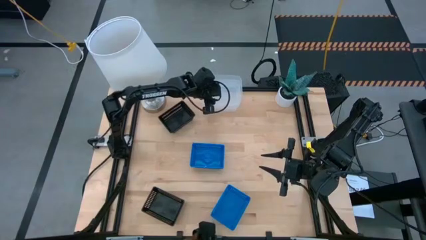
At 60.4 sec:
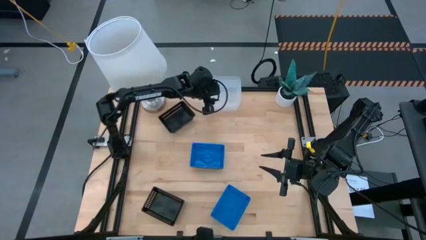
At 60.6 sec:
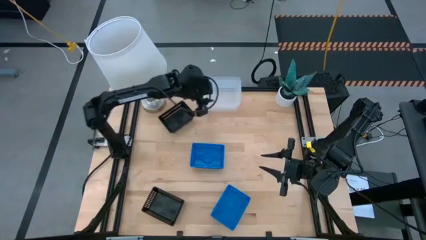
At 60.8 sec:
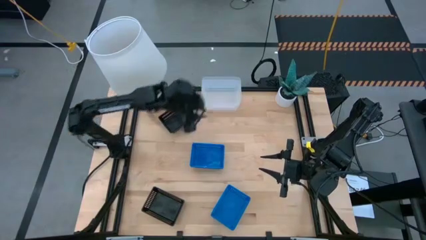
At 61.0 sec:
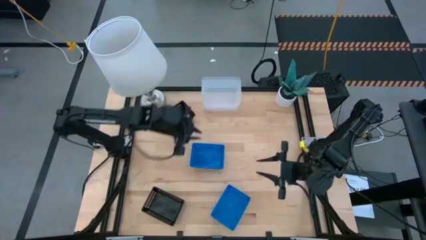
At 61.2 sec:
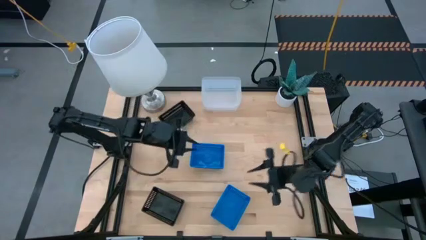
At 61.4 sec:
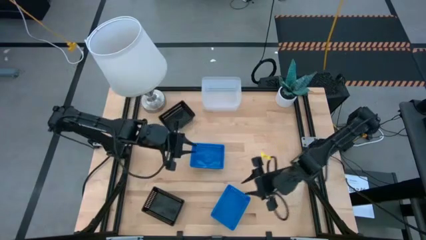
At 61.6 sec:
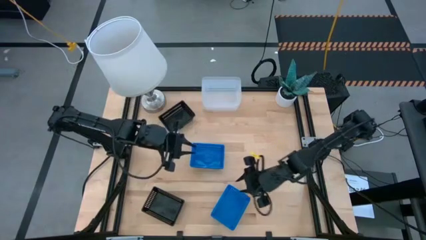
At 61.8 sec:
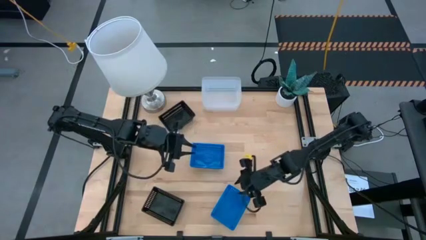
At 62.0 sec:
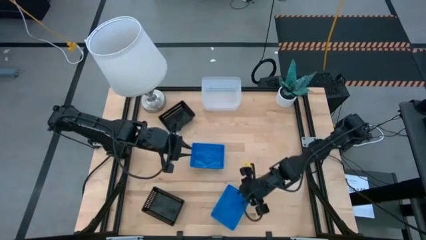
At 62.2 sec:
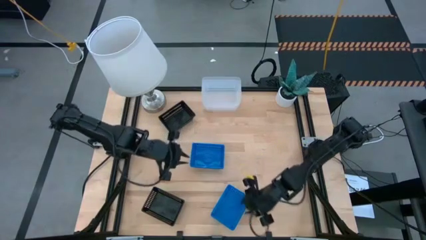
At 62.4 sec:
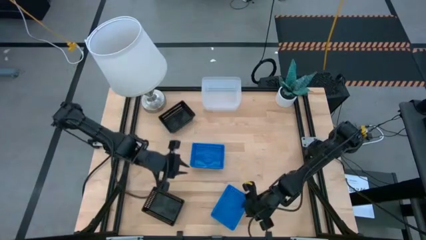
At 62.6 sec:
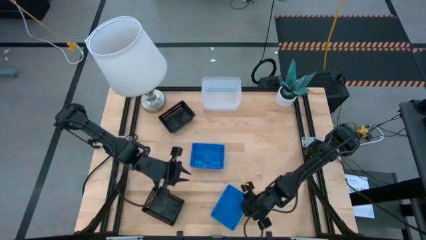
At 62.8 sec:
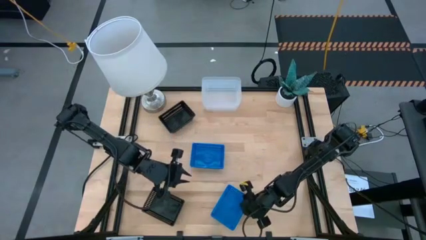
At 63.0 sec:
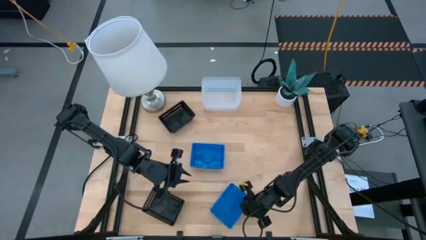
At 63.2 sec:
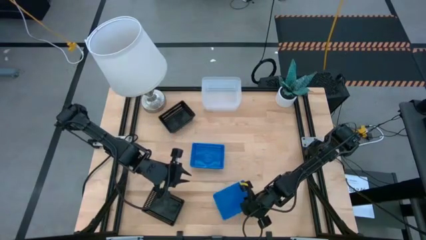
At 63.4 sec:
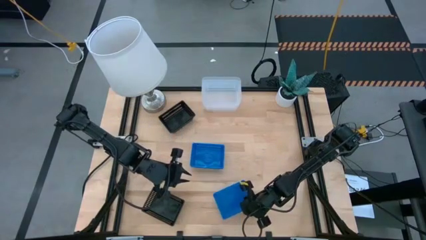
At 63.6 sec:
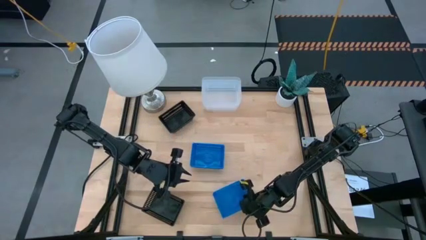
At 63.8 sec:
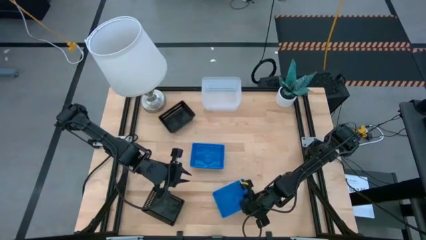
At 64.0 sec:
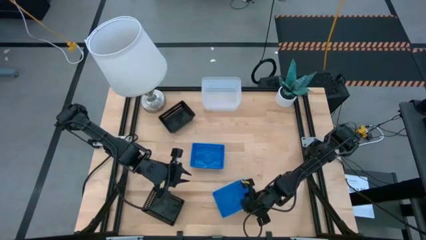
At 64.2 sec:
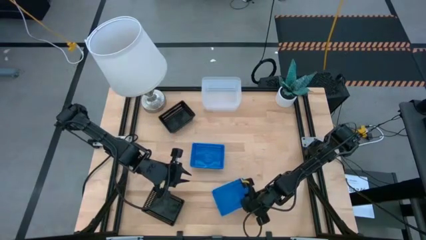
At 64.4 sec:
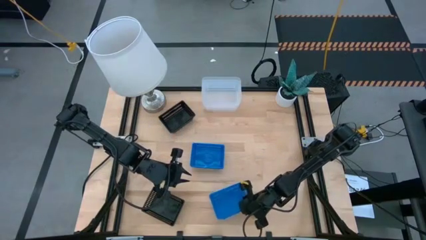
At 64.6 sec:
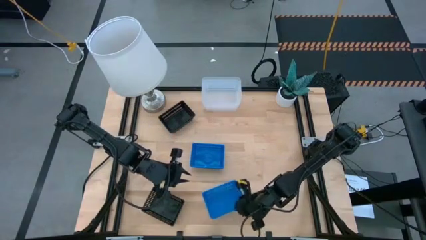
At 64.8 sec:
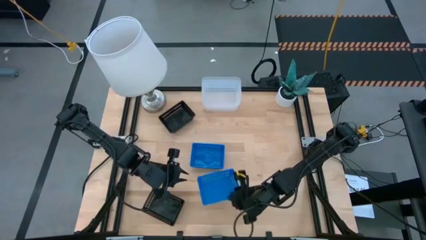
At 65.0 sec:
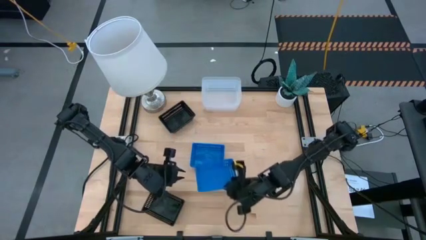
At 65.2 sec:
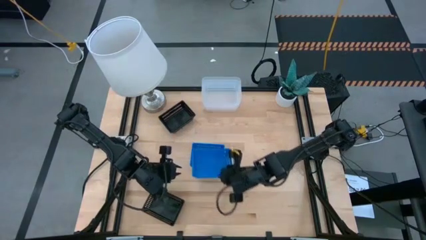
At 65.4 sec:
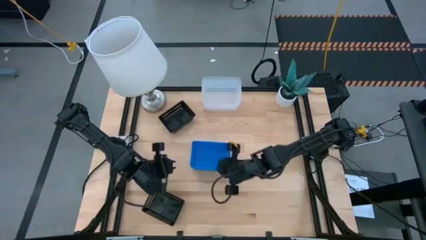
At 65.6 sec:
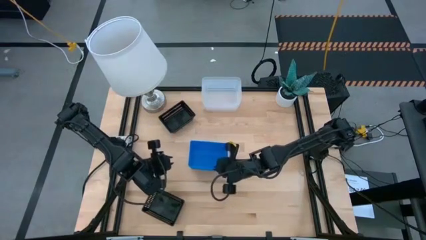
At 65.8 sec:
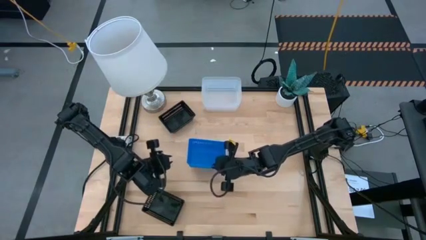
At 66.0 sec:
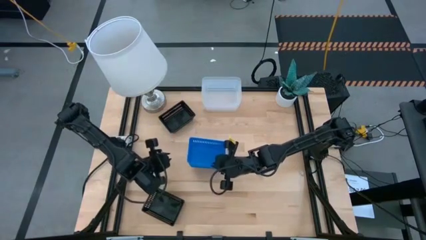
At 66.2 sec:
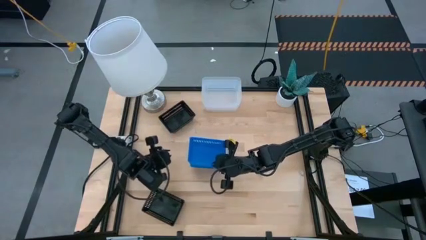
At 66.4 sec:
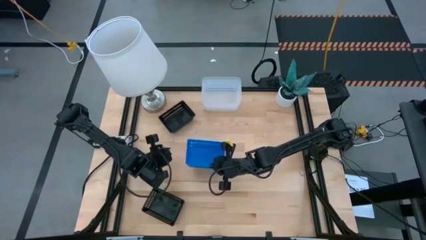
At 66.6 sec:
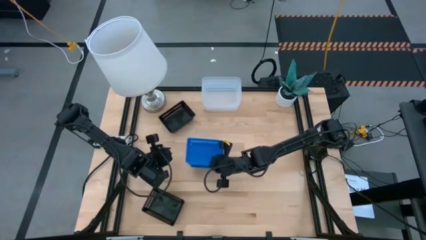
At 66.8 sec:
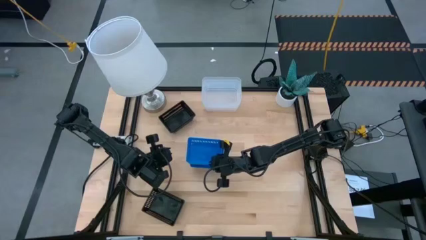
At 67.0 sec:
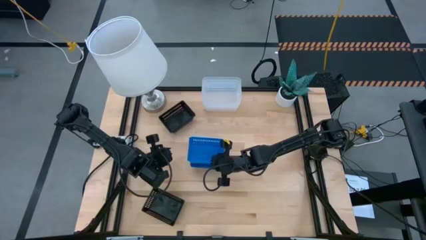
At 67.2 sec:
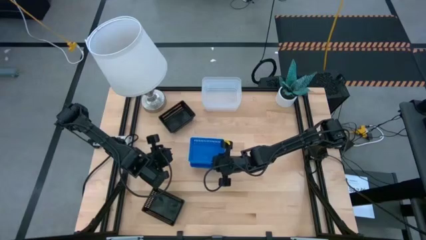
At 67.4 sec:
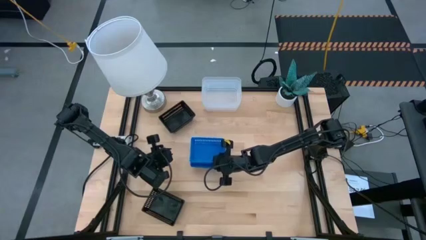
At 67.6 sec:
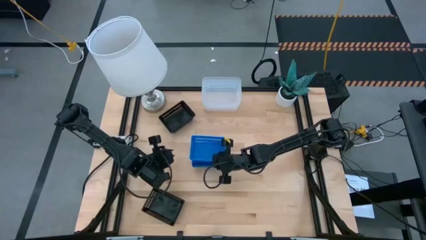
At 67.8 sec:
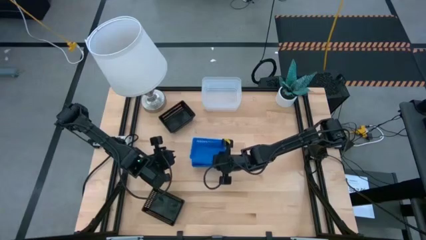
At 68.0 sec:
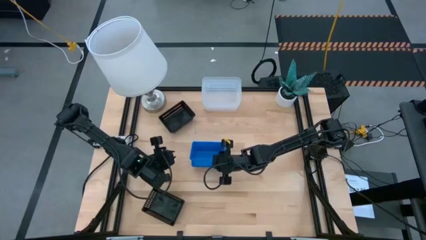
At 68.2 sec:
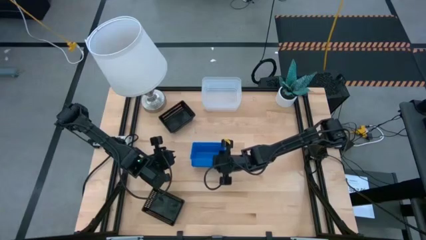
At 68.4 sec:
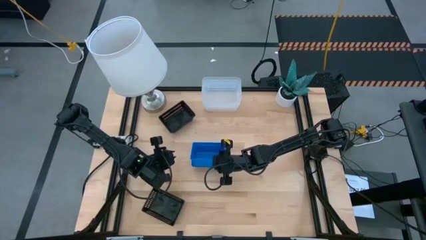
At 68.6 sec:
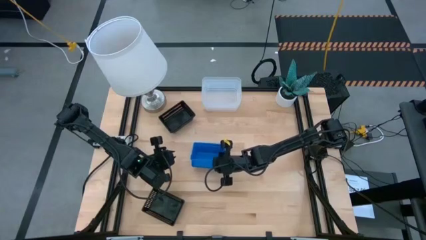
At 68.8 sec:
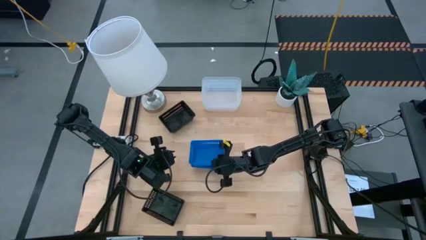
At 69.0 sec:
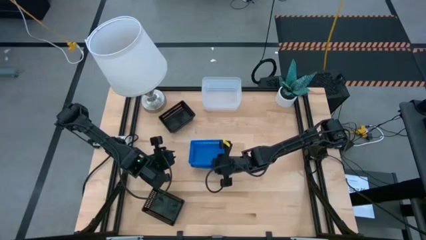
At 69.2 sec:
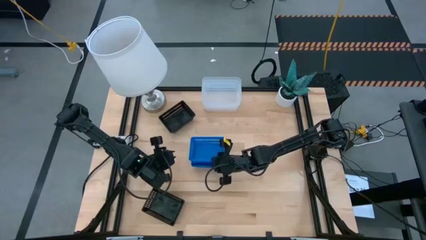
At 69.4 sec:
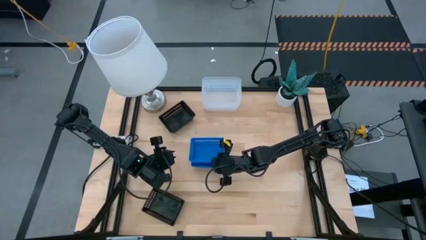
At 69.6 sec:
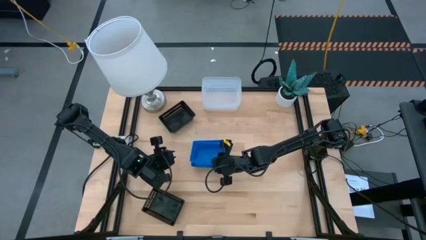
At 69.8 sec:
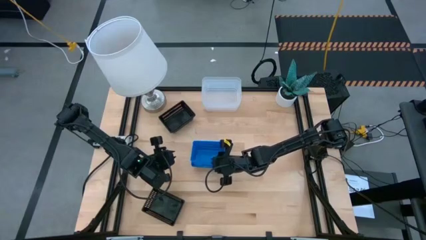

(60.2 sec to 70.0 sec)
Stack the bottom blue bin on the top blue bin

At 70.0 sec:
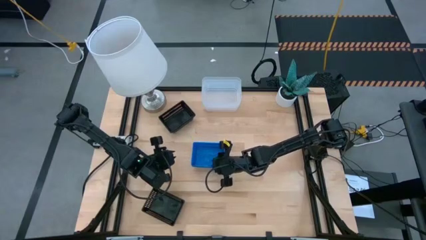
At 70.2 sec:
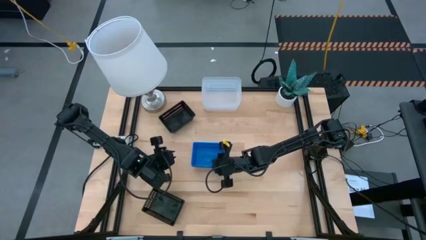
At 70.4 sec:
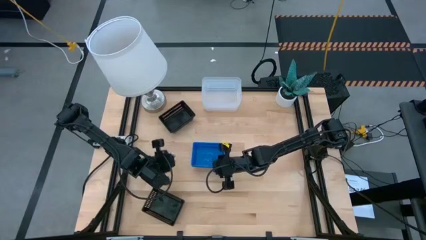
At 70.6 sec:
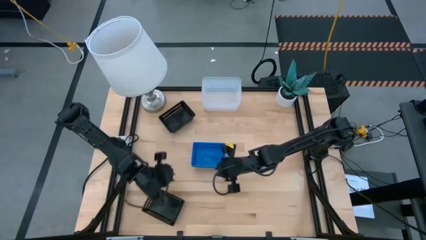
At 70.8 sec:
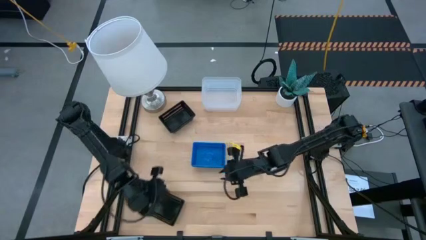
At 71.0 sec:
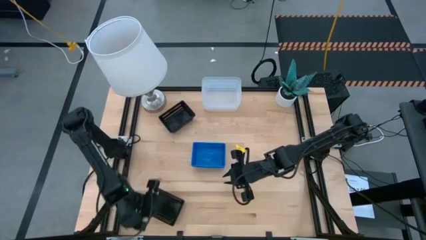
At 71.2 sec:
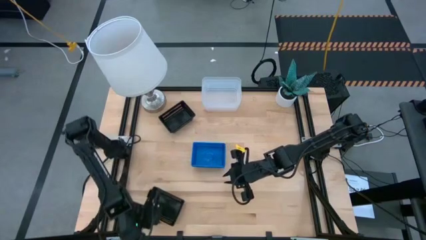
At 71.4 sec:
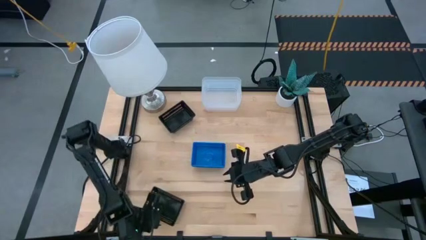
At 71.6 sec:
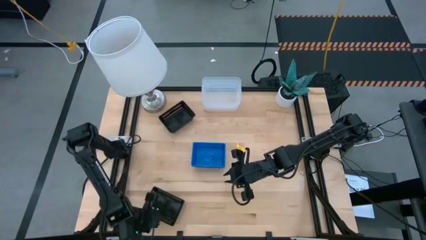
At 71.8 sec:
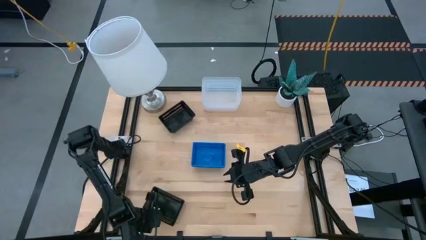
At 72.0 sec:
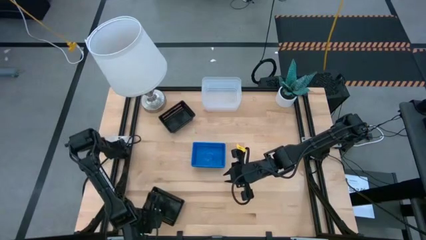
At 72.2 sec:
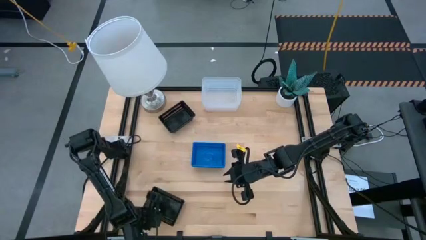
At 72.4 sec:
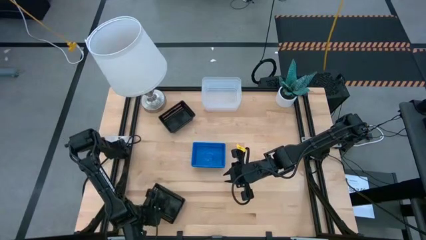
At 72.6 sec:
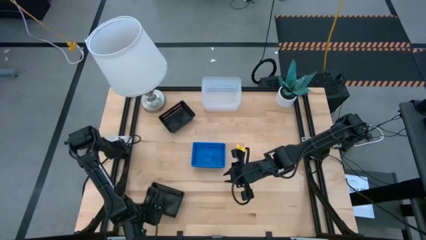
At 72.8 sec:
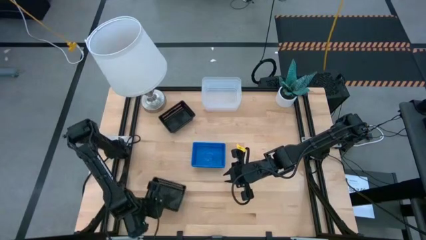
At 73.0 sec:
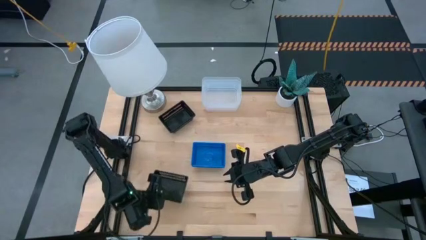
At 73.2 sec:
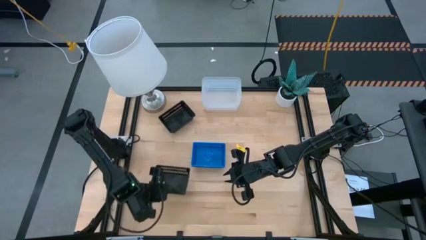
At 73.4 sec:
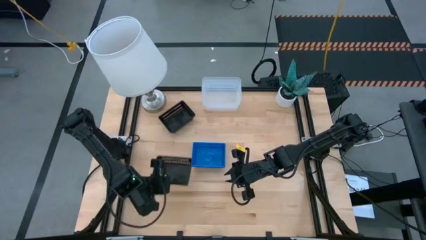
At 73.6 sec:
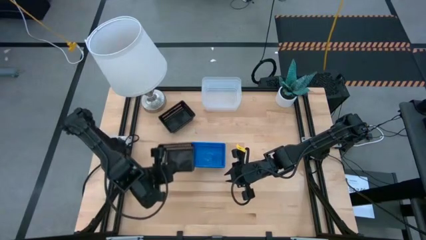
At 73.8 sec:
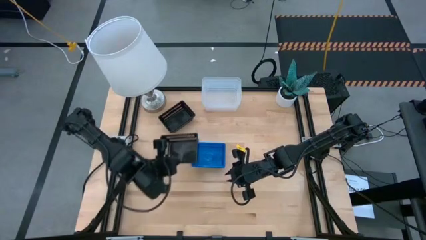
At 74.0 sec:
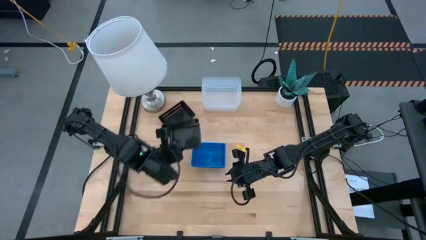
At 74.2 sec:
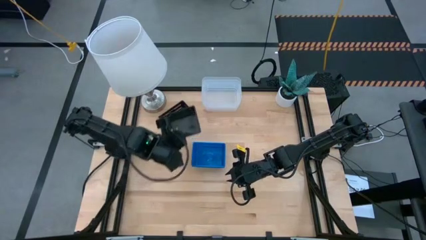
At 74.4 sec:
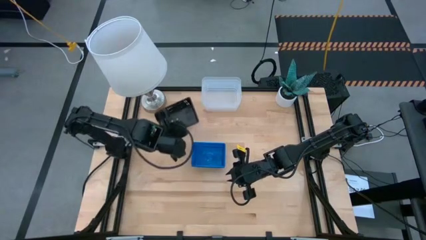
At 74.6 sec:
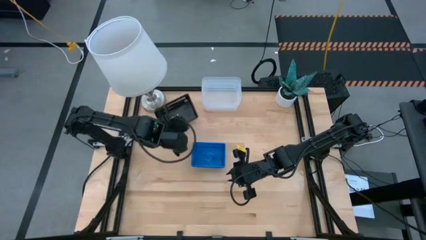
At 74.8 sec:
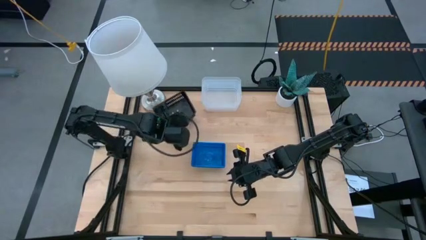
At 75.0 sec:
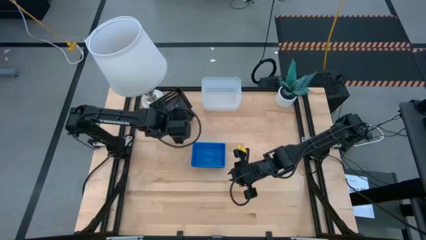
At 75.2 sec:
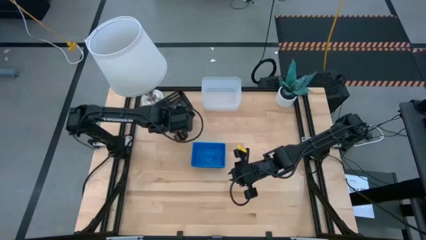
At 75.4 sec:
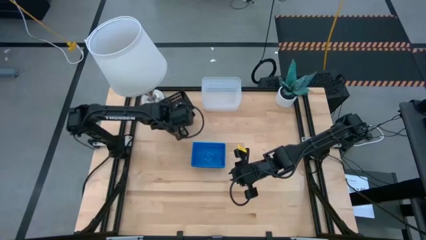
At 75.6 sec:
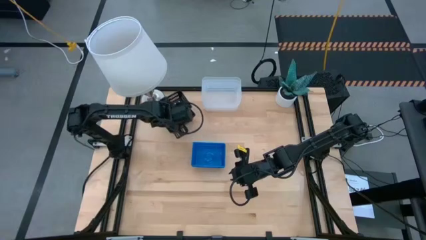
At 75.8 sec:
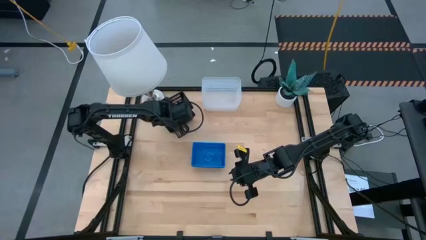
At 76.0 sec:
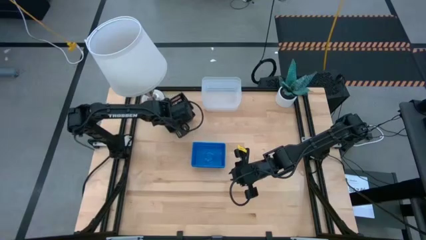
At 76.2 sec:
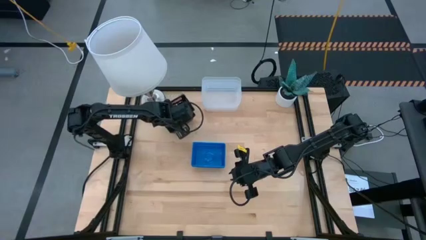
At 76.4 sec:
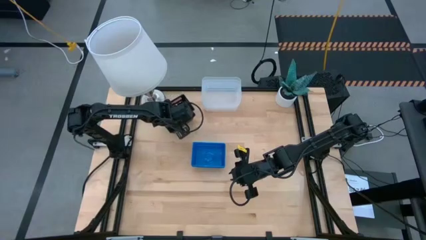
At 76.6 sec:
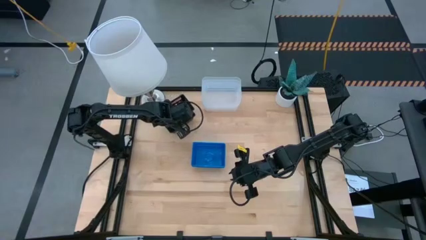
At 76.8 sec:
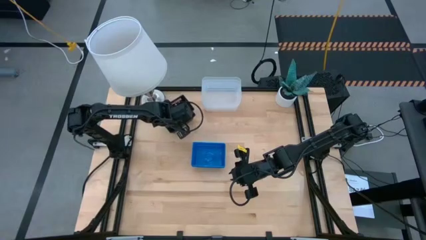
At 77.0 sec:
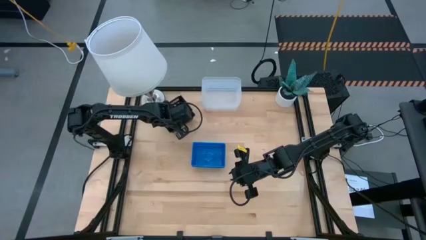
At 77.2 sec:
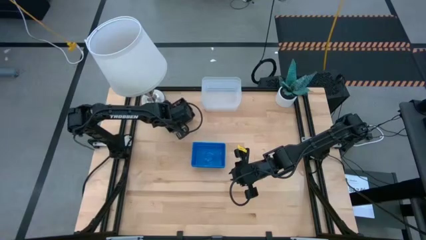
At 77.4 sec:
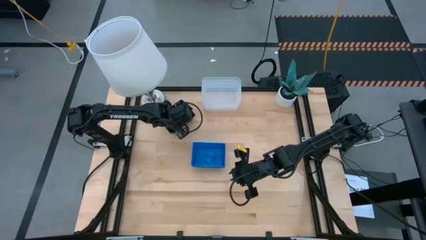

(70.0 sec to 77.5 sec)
Stack the bottom black bin on the top black bin
